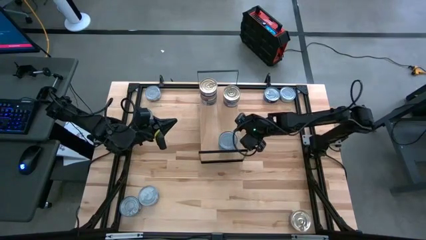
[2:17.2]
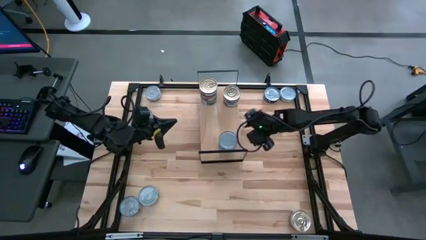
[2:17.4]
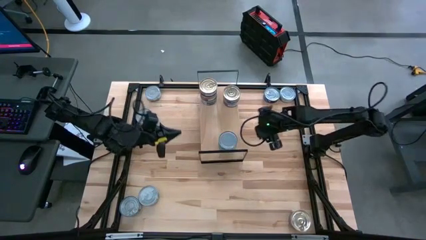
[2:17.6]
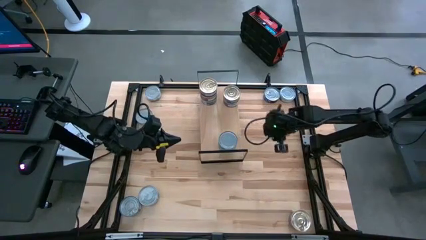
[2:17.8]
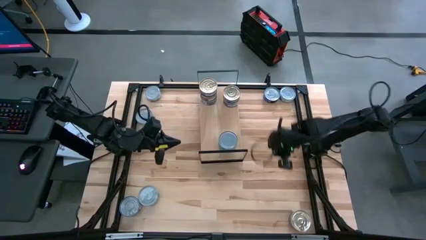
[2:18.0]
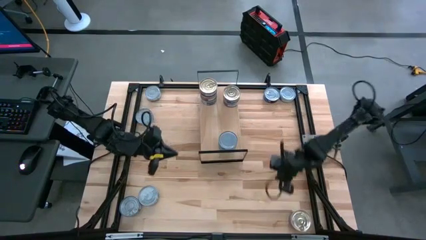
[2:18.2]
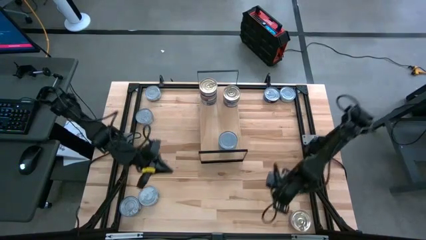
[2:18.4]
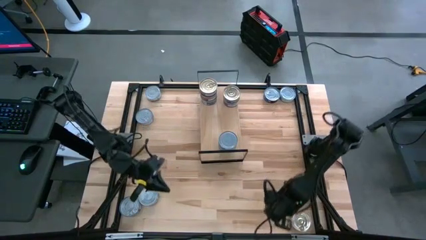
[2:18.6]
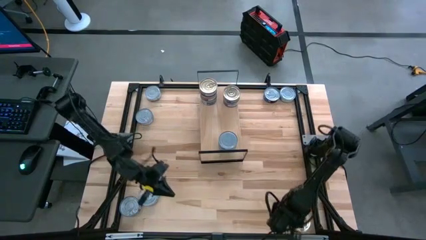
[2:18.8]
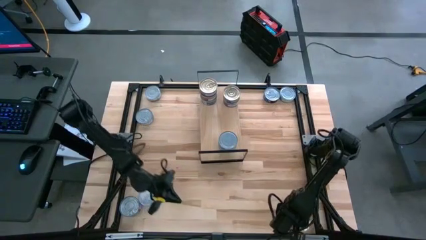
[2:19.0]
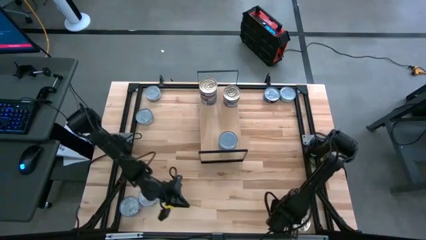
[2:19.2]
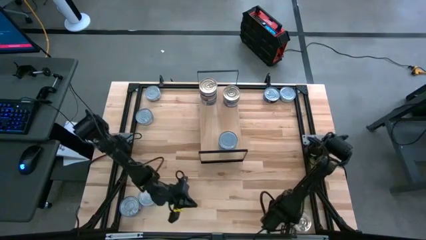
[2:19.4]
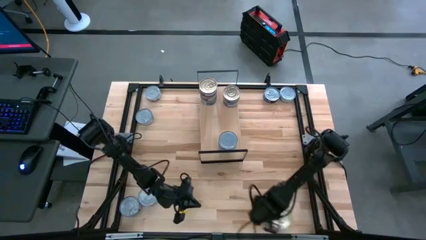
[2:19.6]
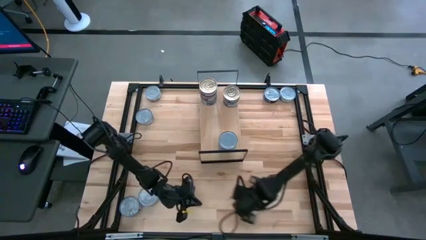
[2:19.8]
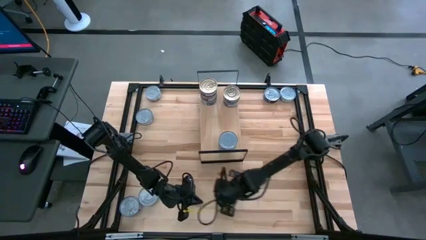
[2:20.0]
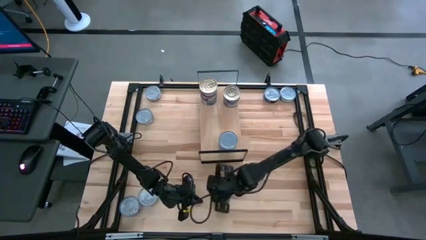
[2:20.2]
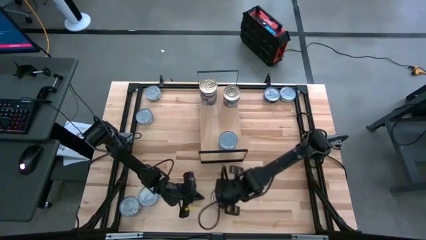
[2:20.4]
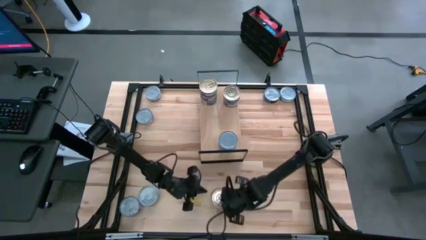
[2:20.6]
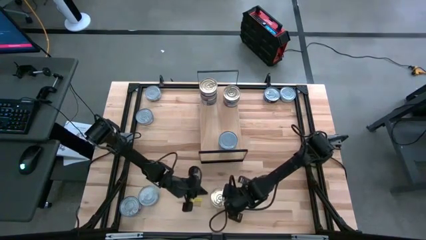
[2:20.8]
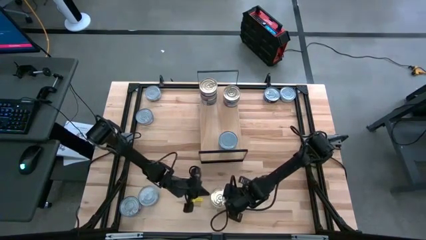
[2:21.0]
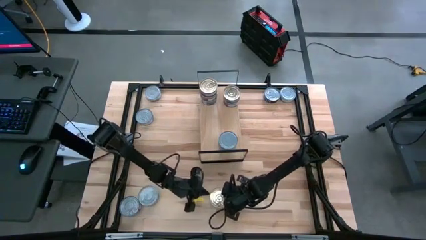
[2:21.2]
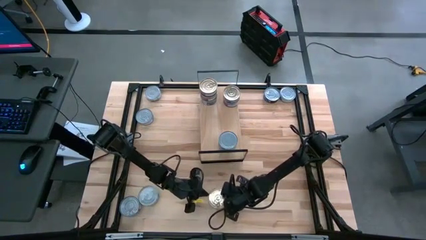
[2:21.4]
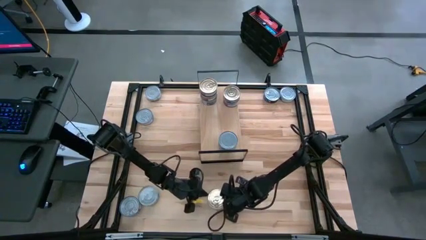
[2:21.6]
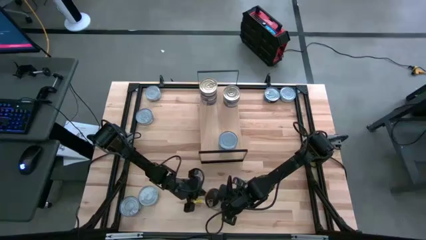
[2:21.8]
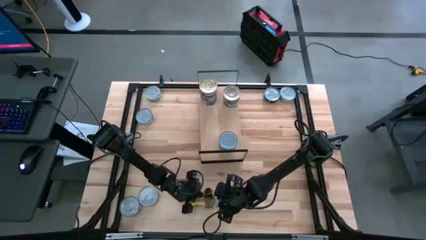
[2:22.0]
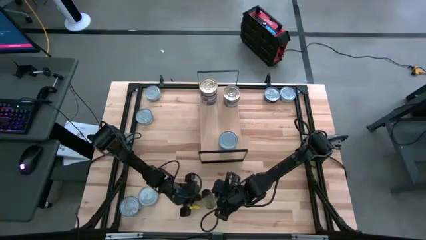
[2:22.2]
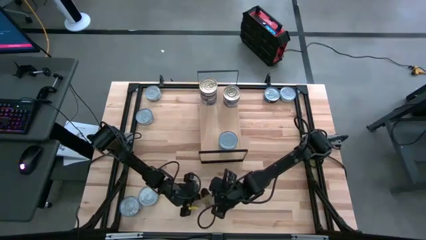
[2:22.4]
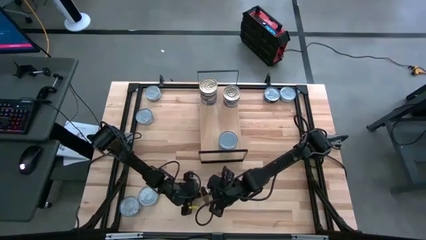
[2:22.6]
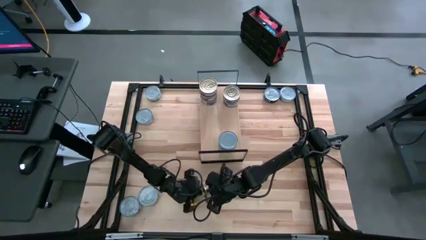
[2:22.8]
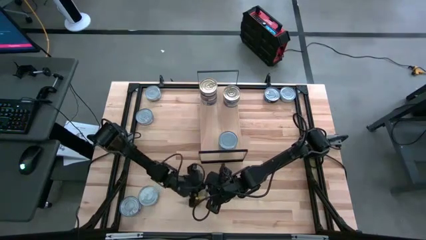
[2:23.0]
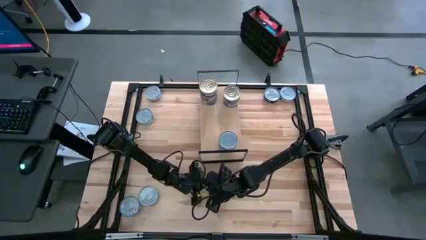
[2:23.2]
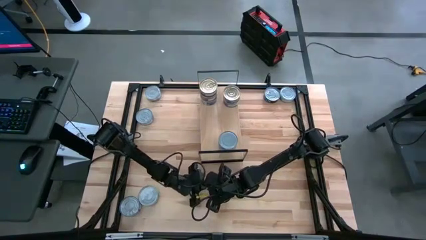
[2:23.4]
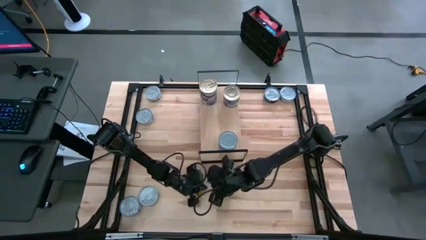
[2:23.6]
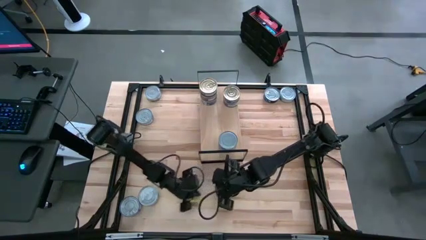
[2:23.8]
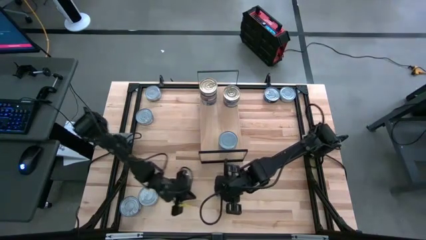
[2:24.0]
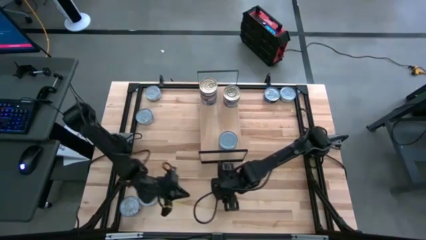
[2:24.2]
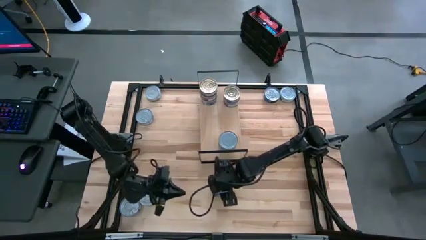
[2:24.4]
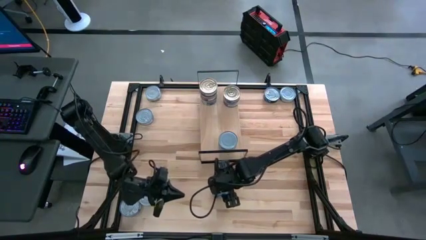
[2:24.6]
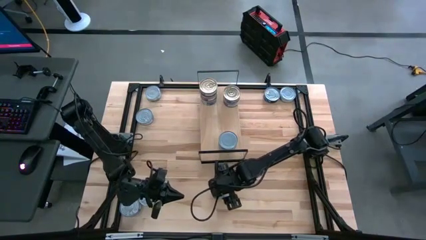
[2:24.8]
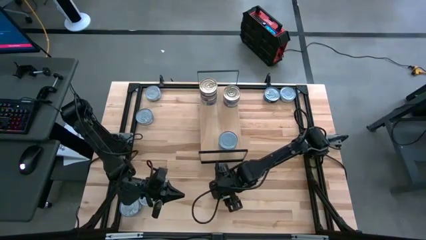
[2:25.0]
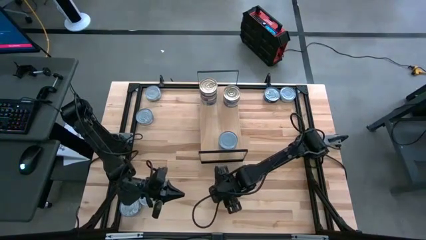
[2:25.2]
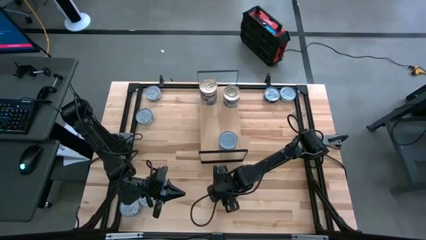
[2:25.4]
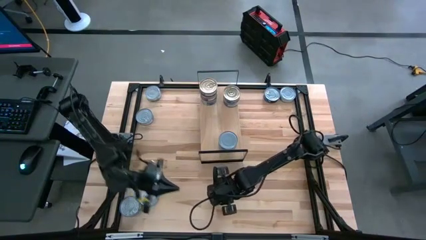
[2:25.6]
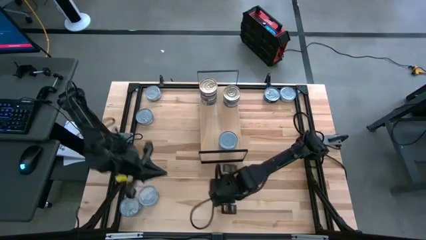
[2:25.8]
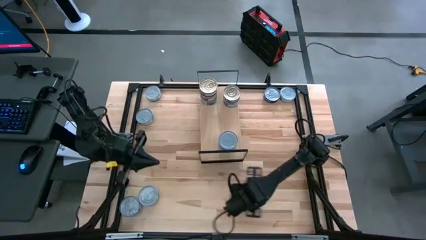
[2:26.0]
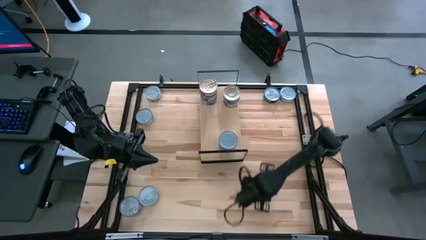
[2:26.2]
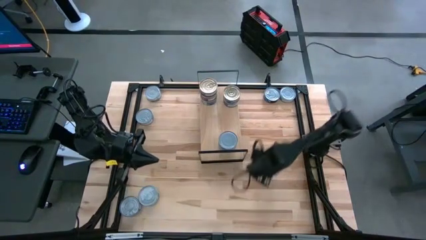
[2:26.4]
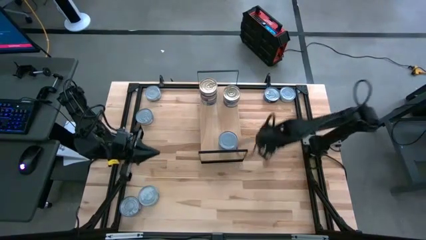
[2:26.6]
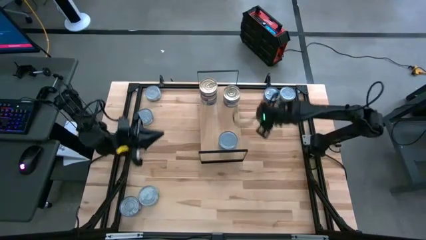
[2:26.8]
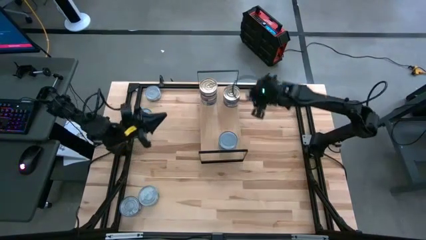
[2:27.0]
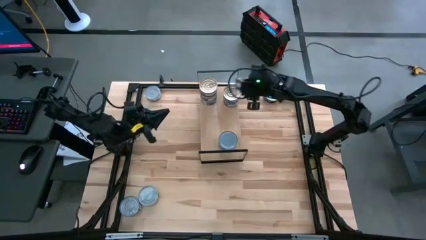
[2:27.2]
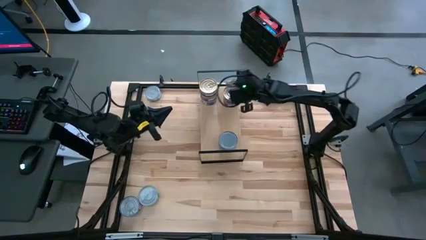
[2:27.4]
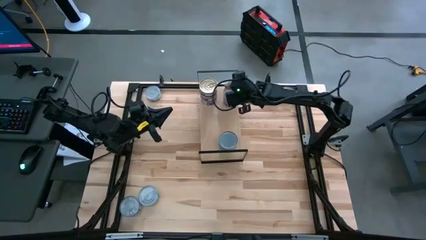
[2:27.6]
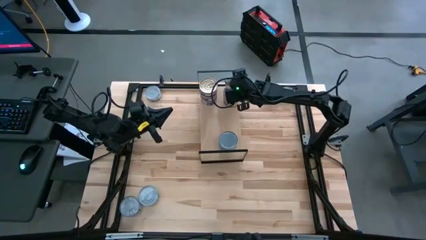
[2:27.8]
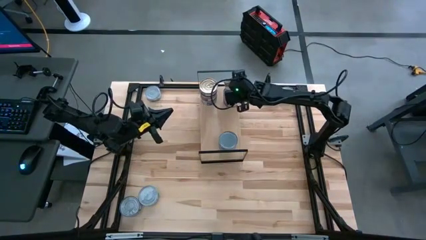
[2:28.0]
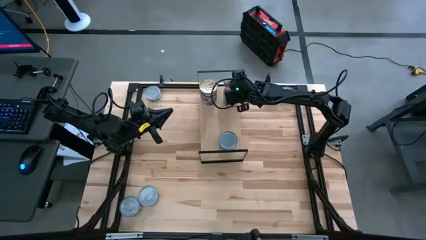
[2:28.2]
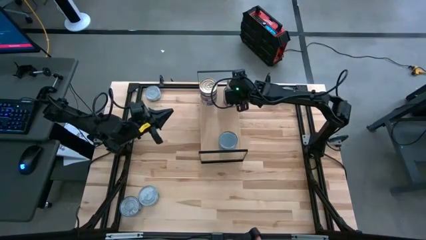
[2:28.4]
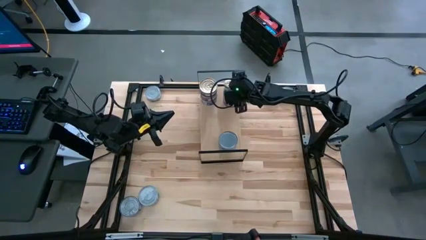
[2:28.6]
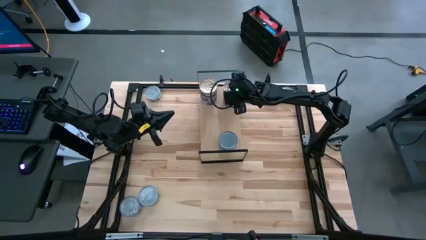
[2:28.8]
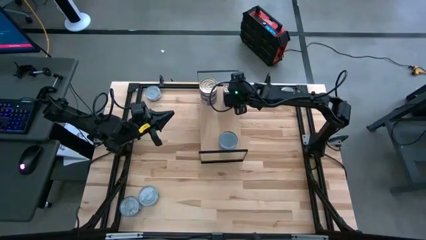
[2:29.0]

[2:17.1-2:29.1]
Task: Stack canned seafood by type on shelf
Stack the blue pink tuna can on top of the other blue pink tuna cans on the shelf
